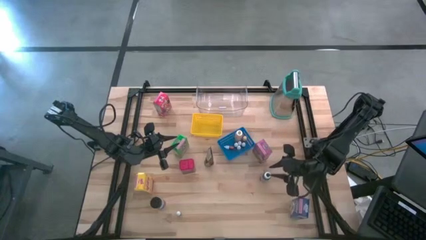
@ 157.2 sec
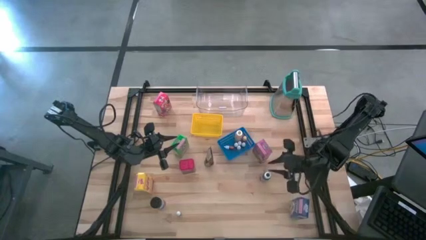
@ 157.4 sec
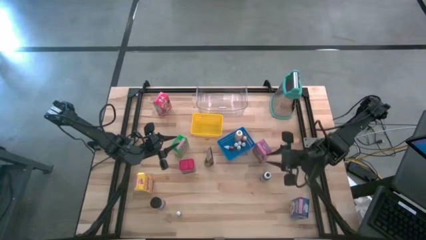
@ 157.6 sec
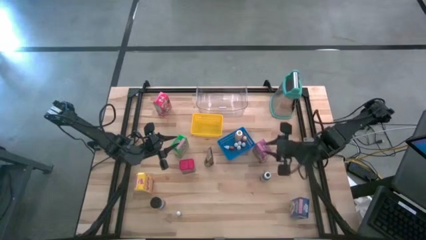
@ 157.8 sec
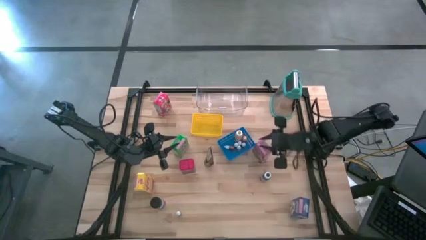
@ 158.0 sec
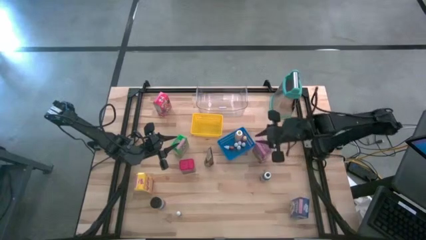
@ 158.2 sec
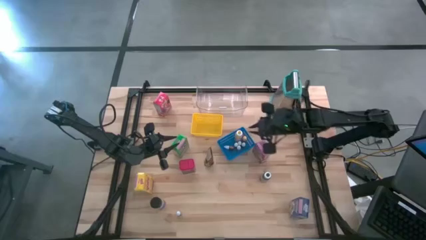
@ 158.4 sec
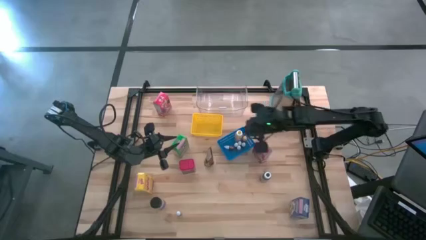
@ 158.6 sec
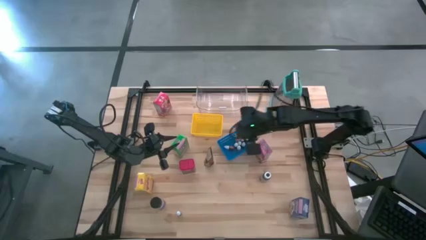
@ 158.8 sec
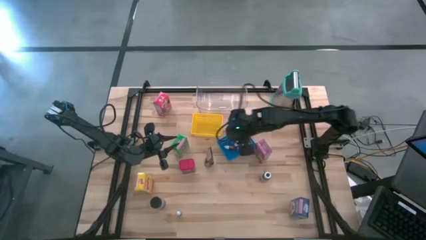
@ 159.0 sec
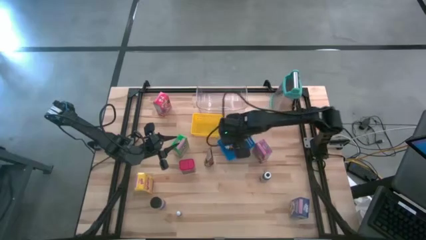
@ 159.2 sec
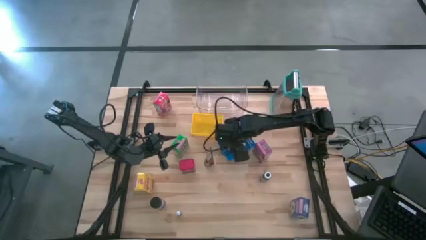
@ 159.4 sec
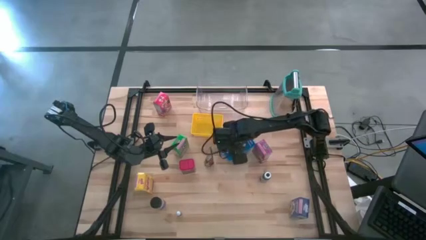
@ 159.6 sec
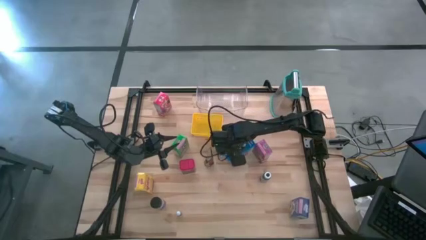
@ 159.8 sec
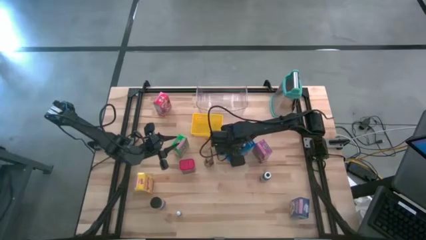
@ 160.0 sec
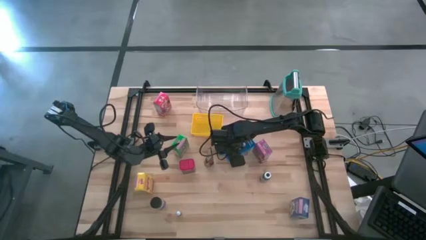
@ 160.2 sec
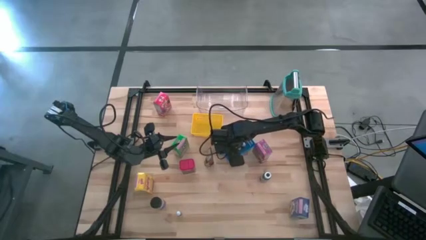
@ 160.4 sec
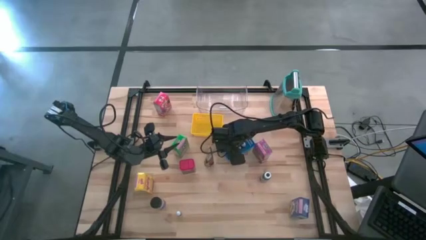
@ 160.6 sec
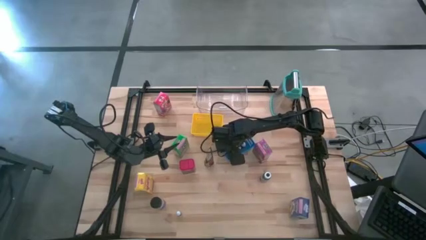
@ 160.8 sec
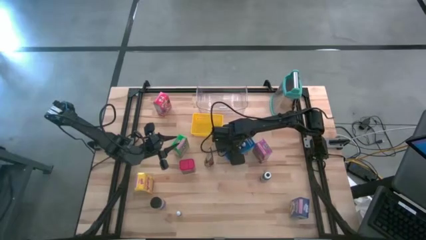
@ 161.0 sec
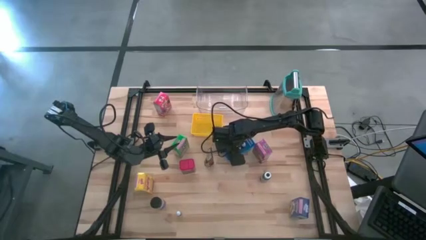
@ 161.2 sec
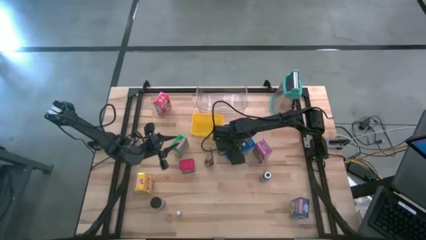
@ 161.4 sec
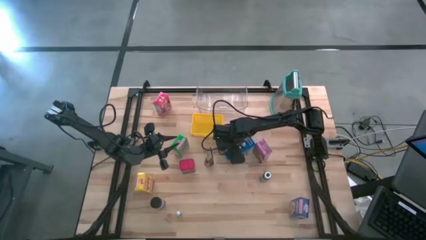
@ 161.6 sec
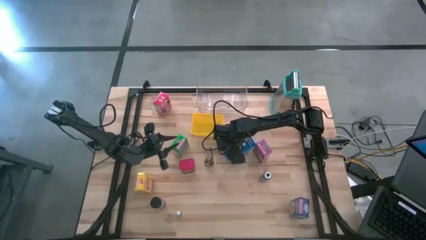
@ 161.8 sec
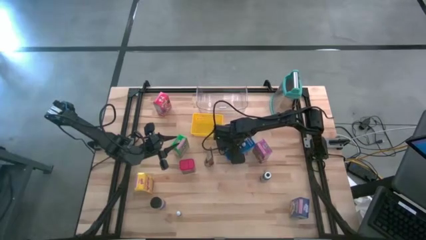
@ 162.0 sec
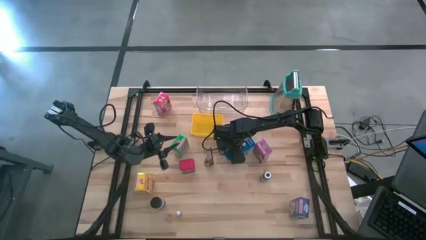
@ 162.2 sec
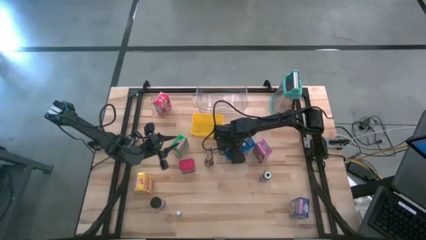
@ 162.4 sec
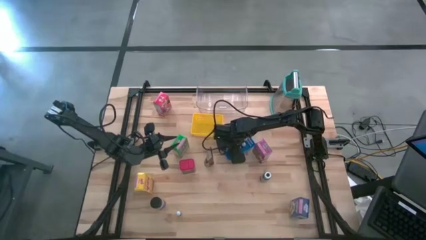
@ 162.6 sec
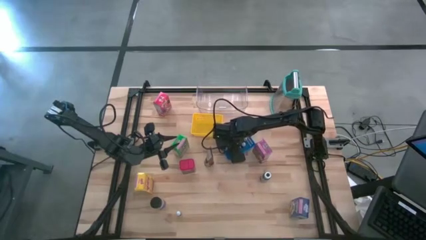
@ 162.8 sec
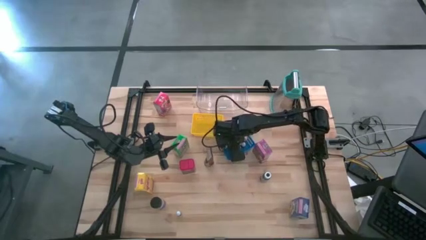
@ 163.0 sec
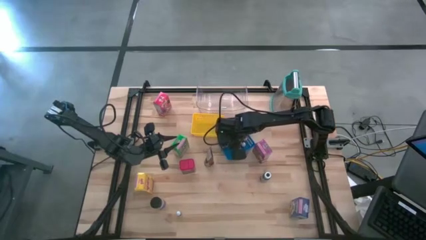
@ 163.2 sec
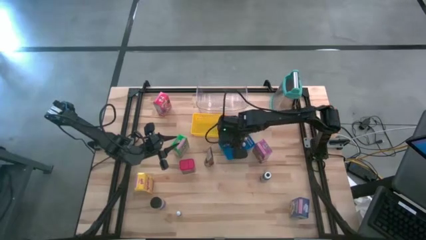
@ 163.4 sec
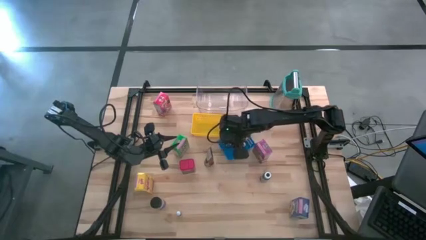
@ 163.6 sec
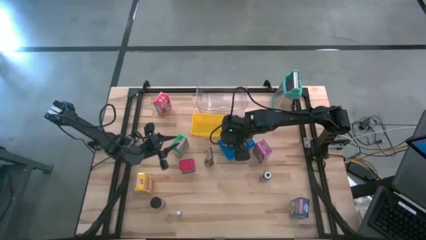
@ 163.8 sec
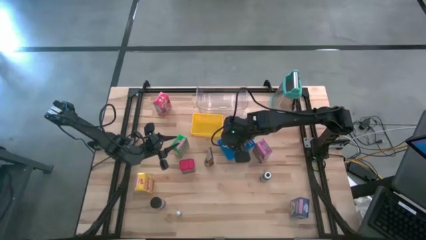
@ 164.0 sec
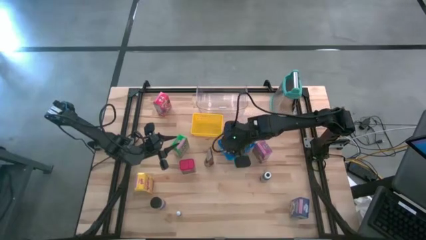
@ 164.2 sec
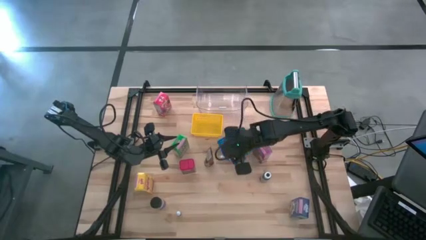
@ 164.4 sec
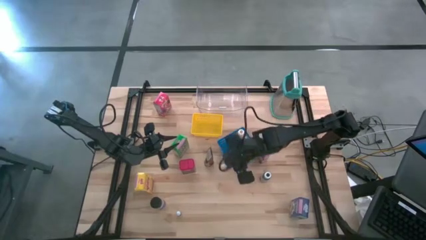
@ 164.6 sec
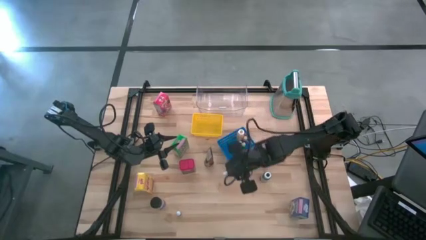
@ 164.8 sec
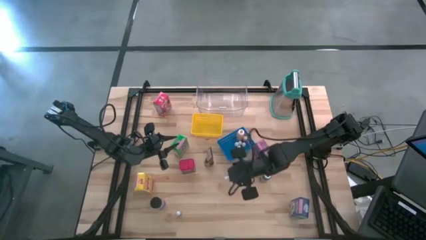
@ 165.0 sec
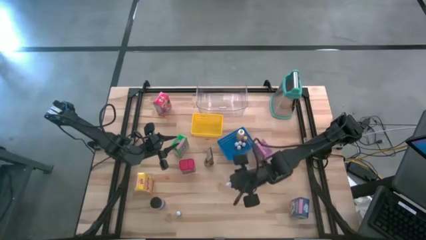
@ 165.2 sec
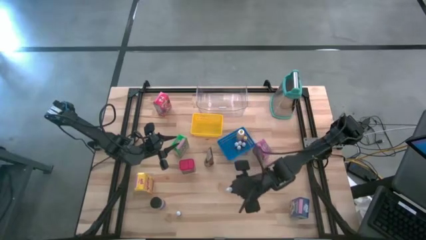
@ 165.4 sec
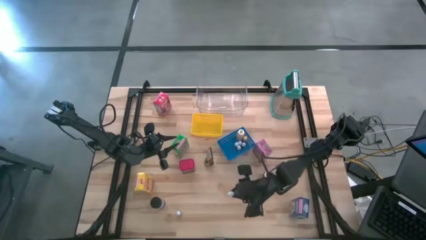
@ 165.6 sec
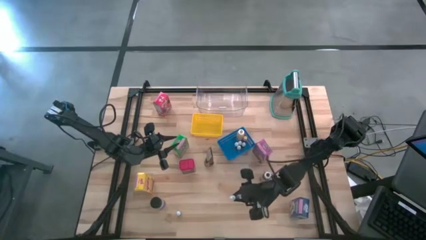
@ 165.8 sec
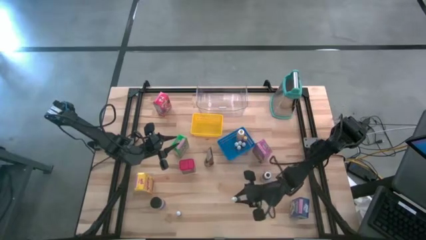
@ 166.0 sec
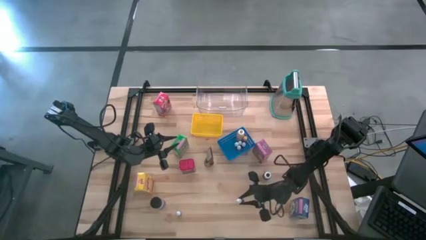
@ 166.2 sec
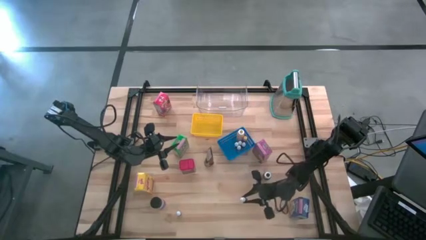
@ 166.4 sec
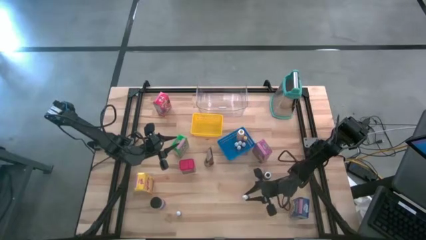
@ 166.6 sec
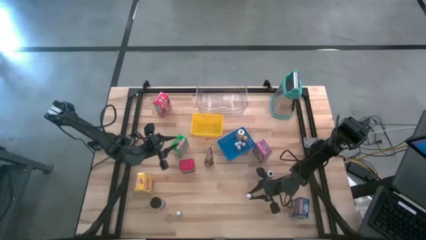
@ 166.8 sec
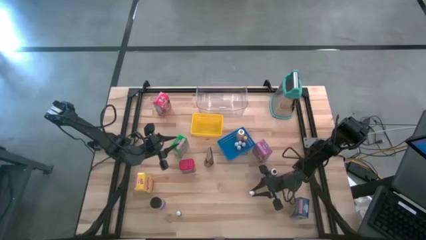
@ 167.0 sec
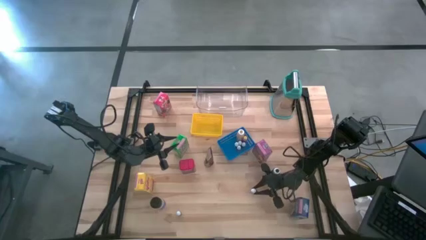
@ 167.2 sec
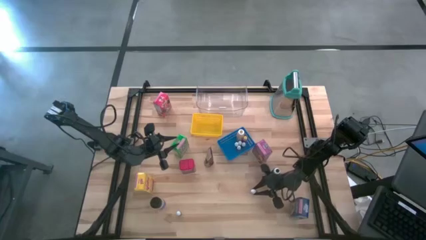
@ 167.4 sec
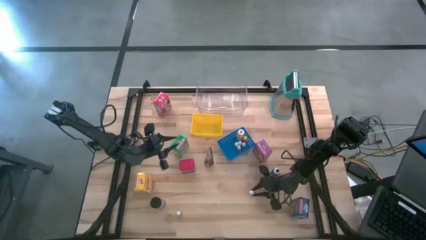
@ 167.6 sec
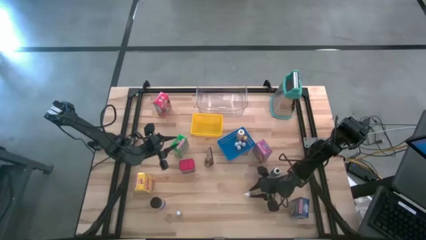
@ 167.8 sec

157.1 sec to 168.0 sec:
Task: Pick & Place Kitchen Items
Remove the orange food coloring bottle from the blue bin

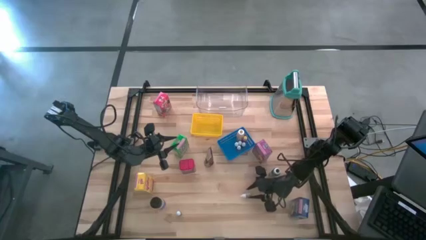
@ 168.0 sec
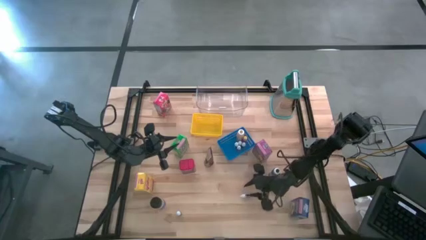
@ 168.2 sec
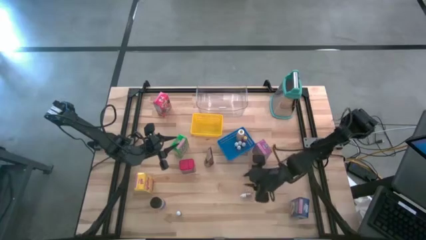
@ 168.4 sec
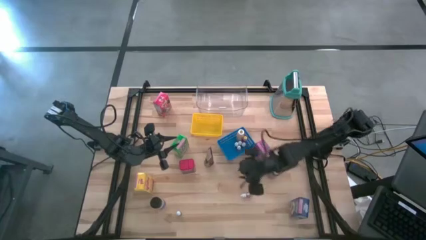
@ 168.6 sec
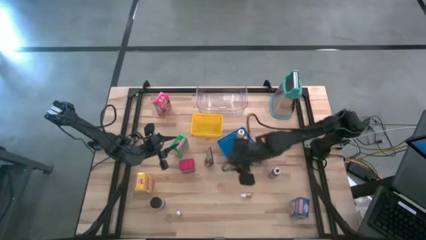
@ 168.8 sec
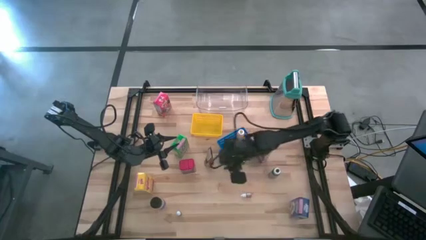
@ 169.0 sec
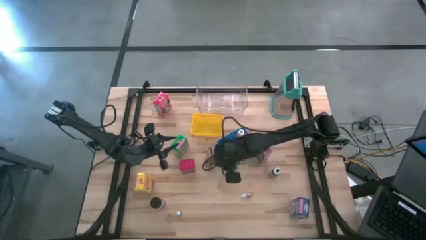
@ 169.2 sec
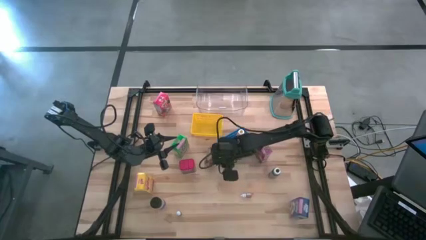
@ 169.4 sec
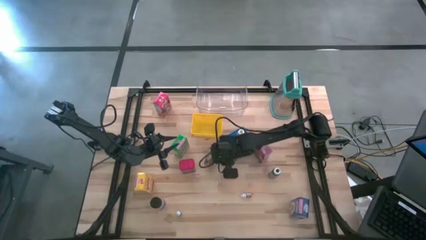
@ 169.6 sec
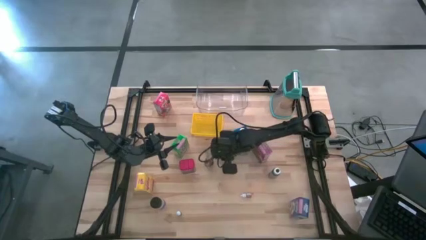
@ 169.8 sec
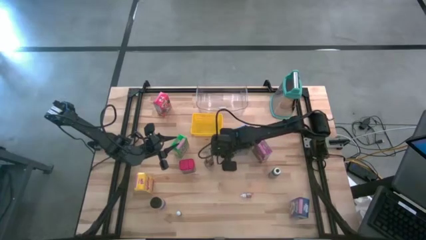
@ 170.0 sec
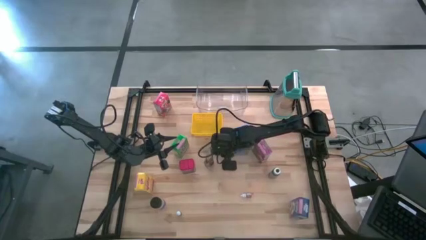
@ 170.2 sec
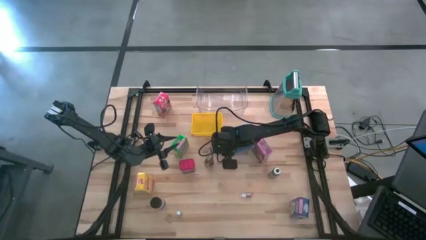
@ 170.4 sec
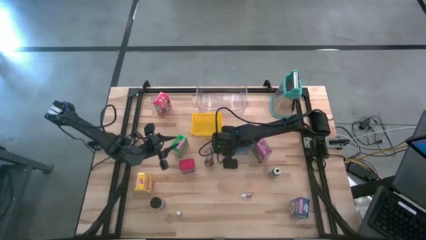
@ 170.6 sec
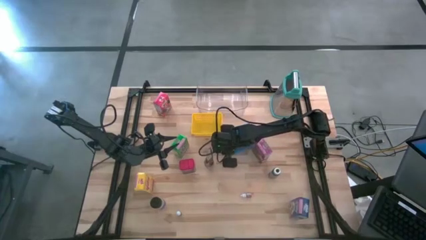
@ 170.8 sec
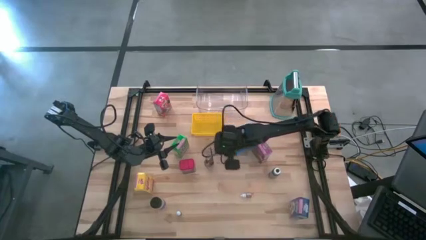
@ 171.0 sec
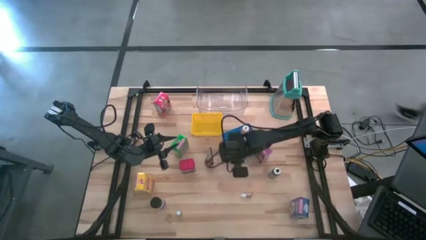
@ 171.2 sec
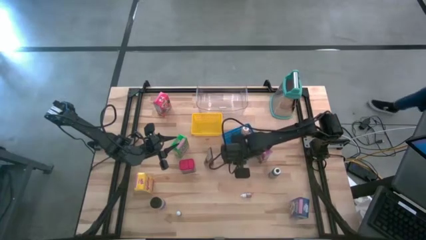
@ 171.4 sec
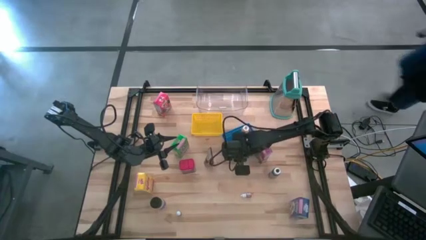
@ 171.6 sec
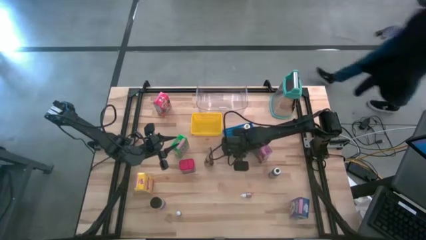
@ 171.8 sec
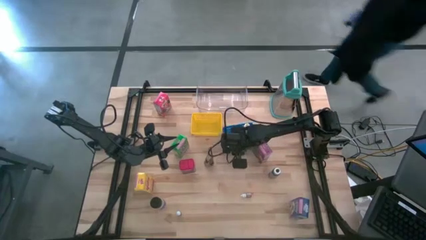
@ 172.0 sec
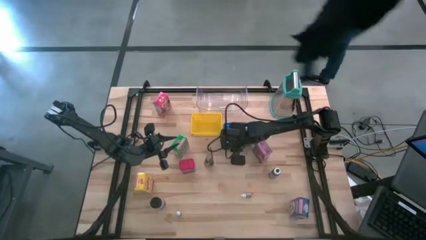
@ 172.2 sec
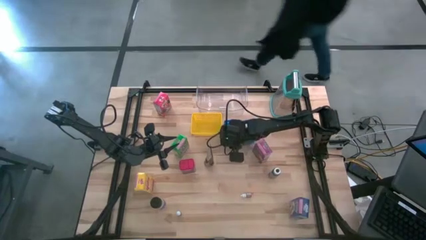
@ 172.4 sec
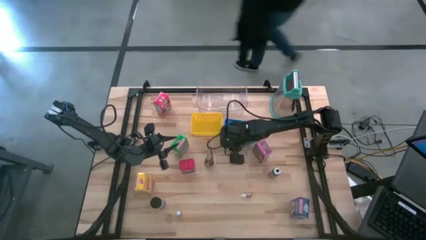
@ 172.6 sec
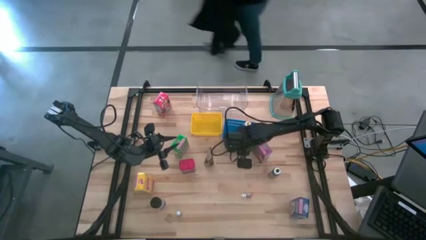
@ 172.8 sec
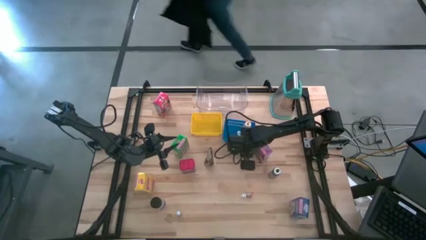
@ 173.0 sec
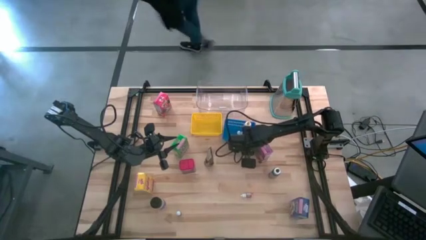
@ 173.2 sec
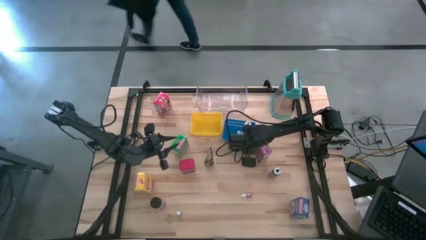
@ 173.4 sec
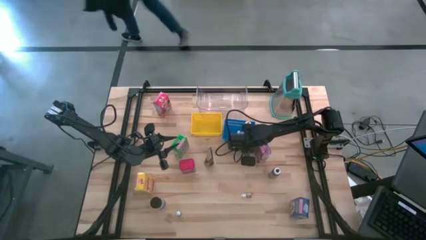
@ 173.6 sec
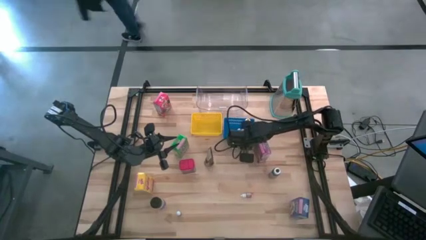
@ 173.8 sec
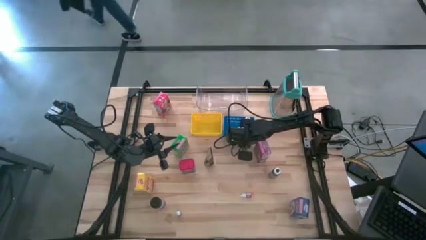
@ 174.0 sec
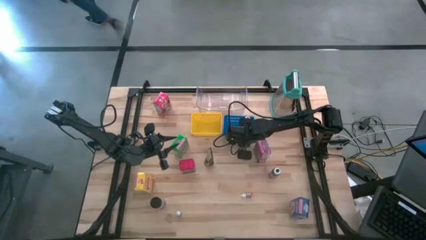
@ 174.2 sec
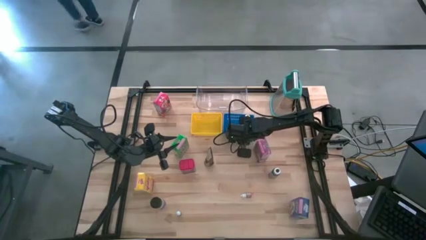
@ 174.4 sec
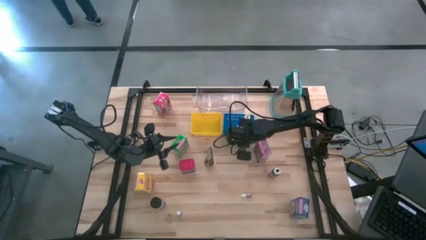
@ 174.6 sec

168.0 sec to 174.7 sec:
Adjust the blue bin
